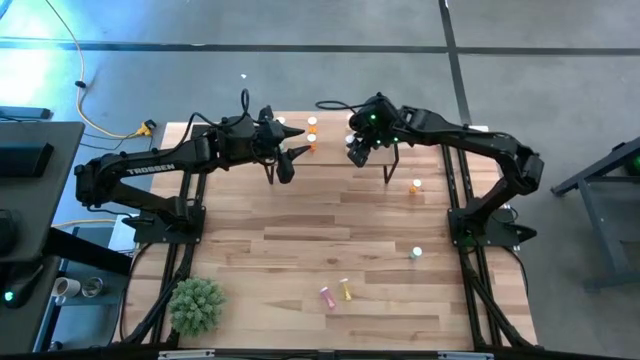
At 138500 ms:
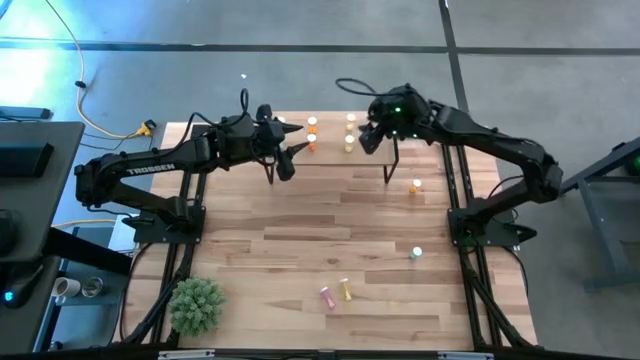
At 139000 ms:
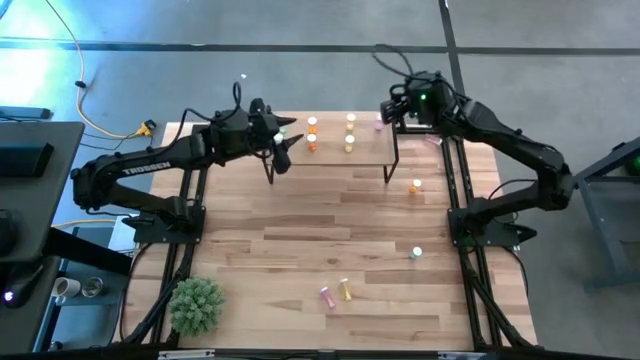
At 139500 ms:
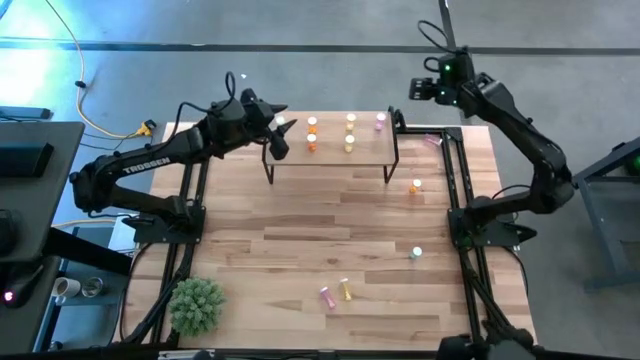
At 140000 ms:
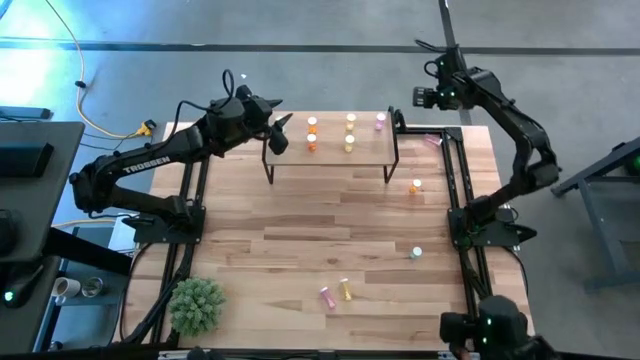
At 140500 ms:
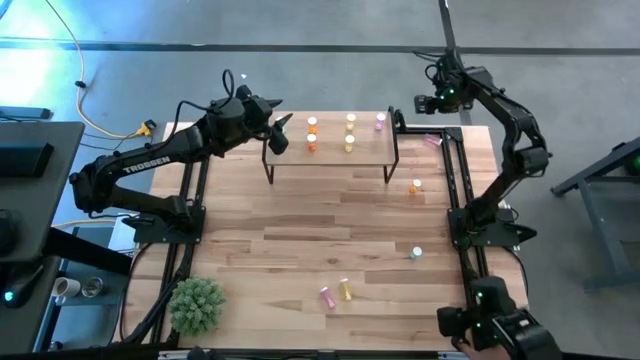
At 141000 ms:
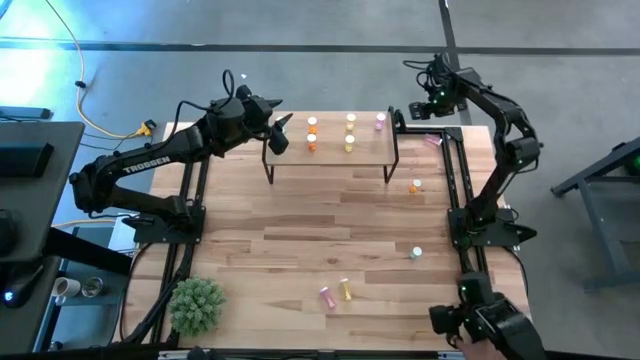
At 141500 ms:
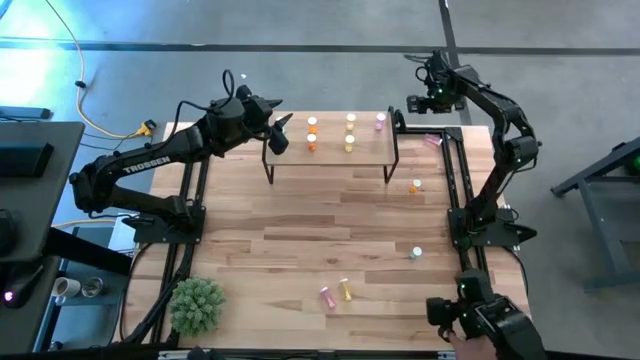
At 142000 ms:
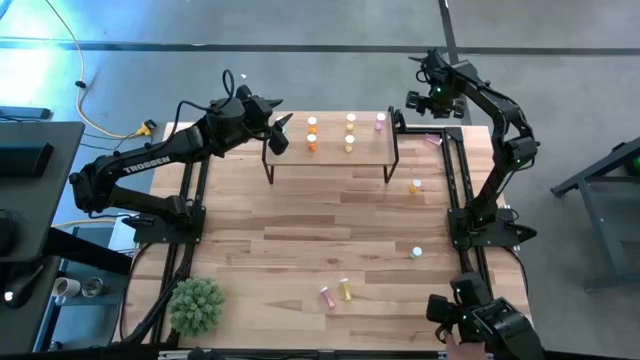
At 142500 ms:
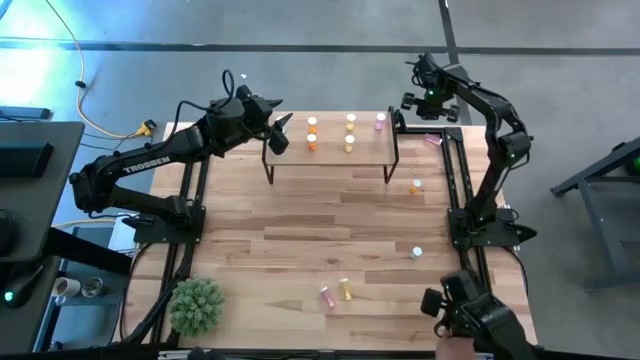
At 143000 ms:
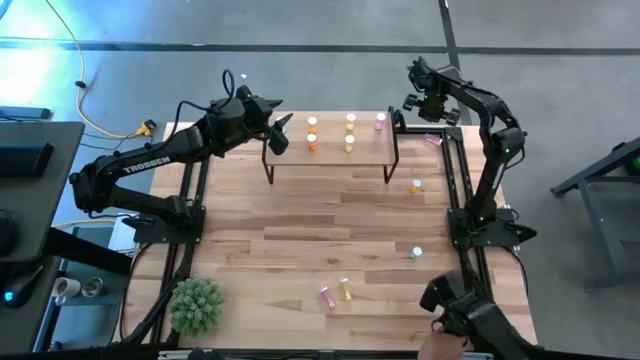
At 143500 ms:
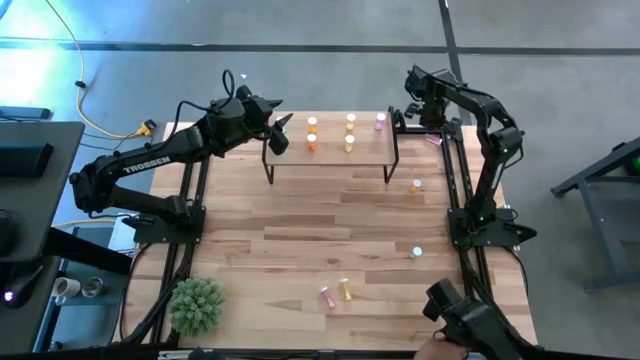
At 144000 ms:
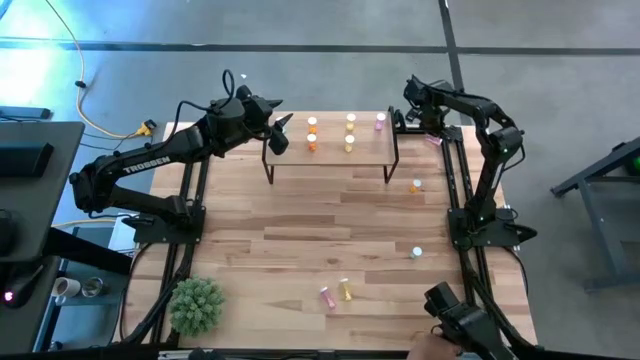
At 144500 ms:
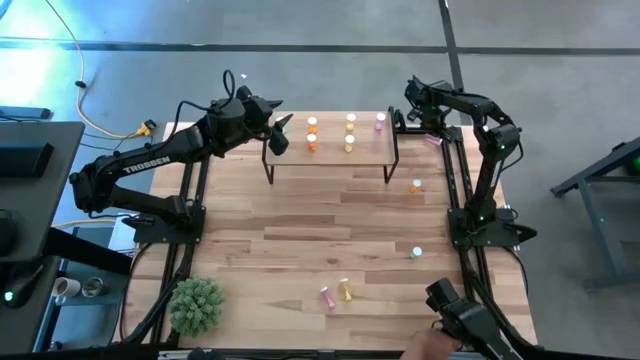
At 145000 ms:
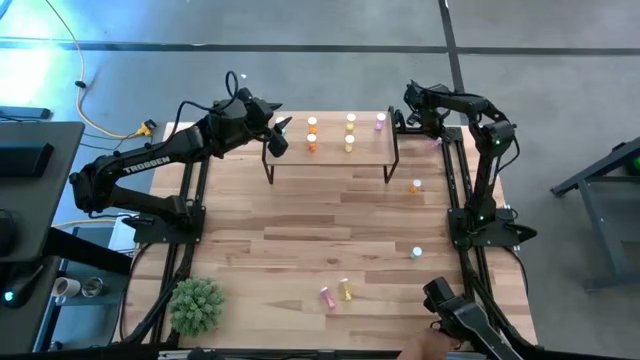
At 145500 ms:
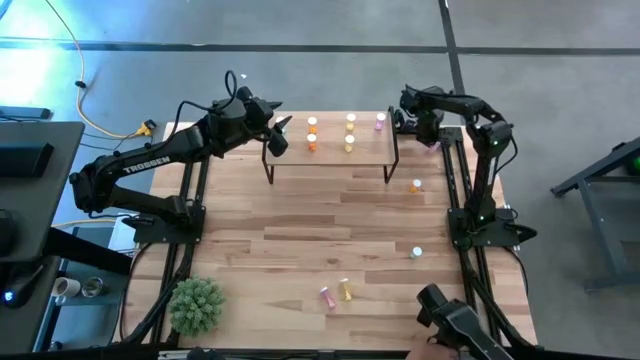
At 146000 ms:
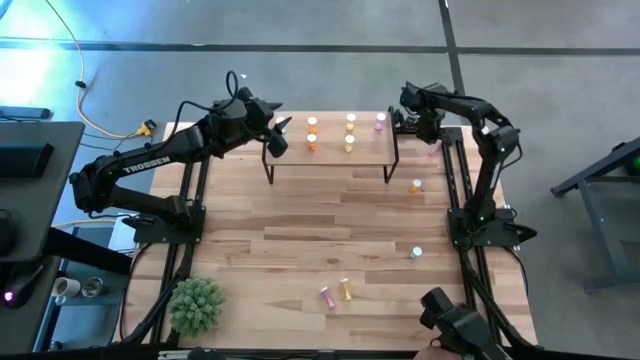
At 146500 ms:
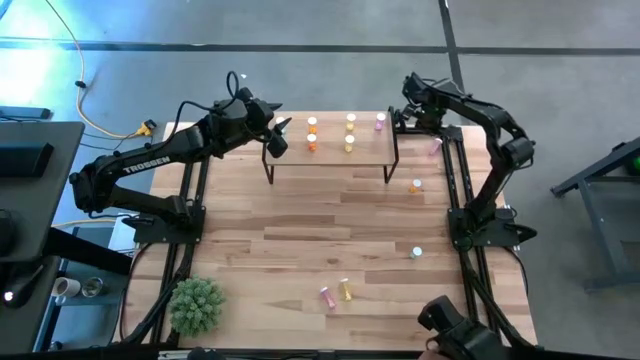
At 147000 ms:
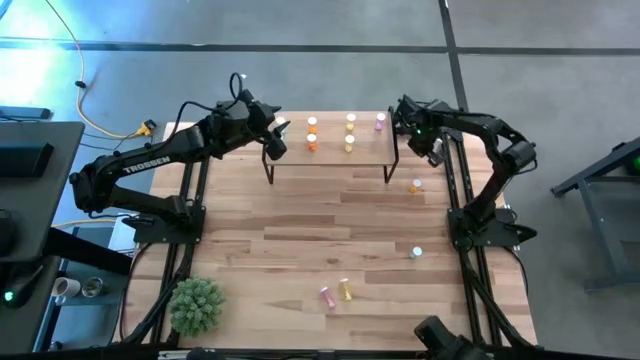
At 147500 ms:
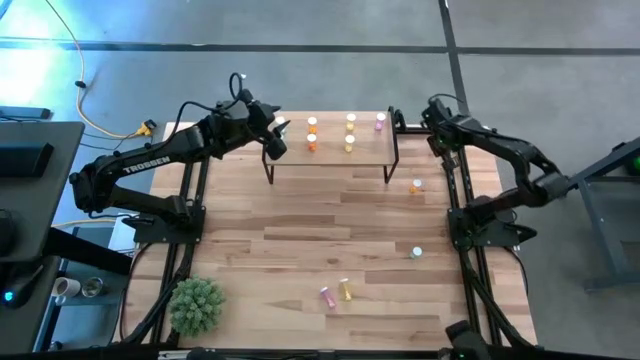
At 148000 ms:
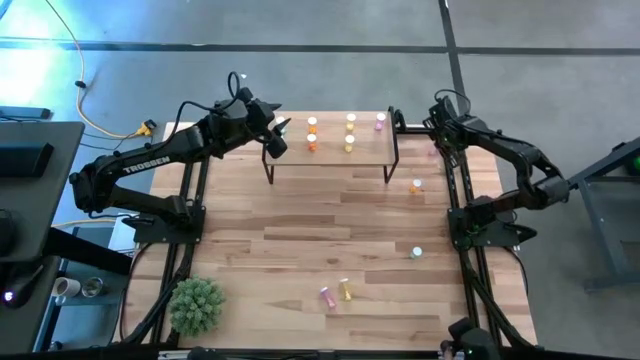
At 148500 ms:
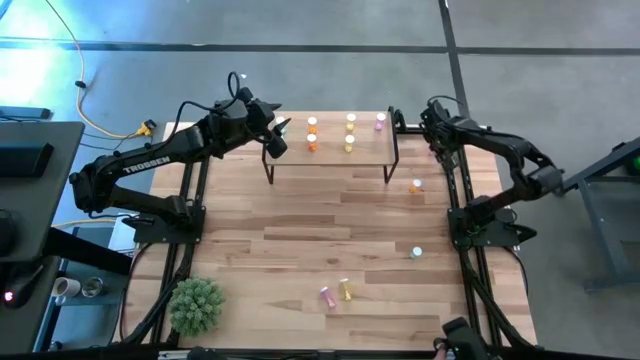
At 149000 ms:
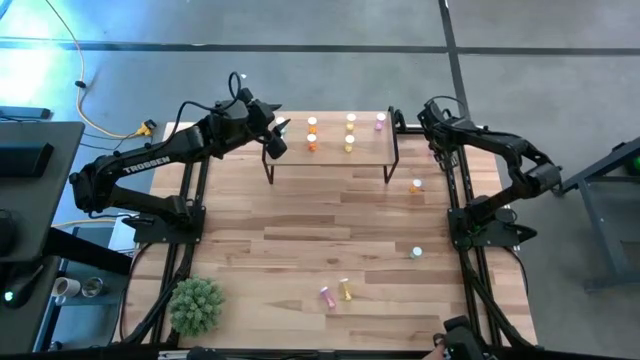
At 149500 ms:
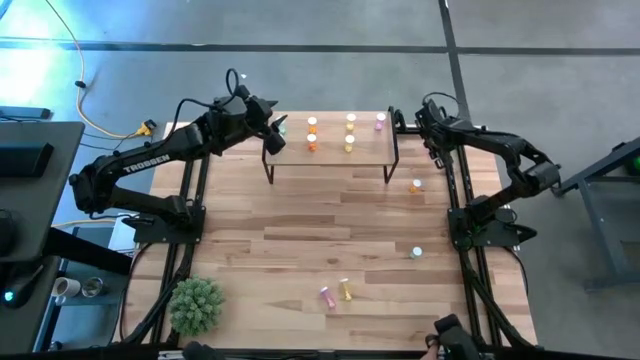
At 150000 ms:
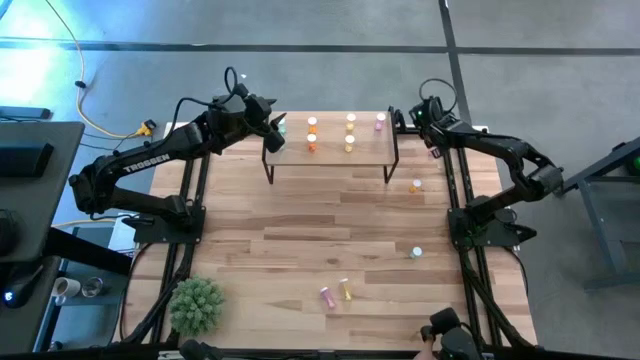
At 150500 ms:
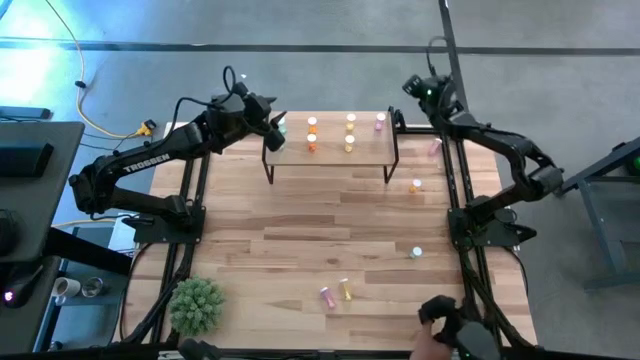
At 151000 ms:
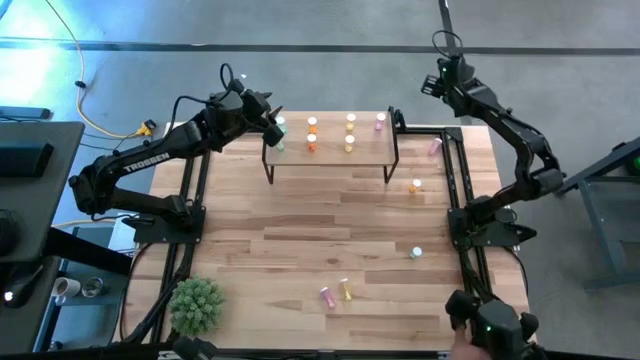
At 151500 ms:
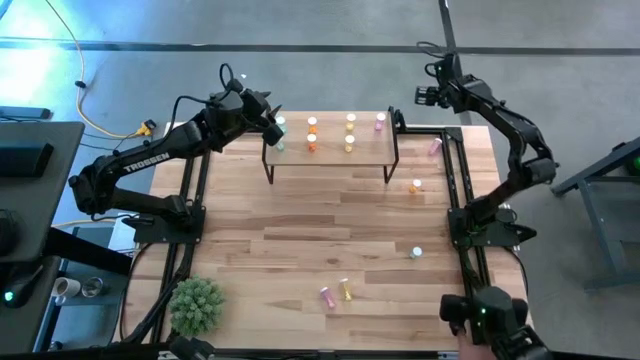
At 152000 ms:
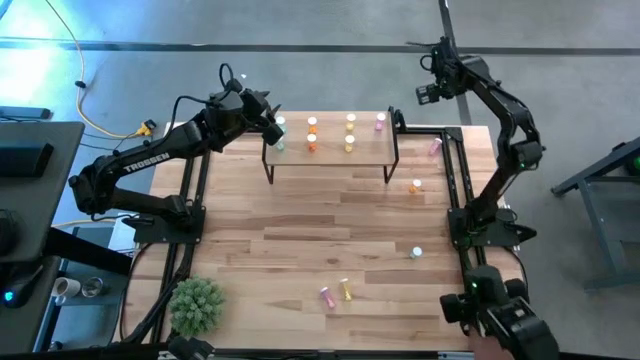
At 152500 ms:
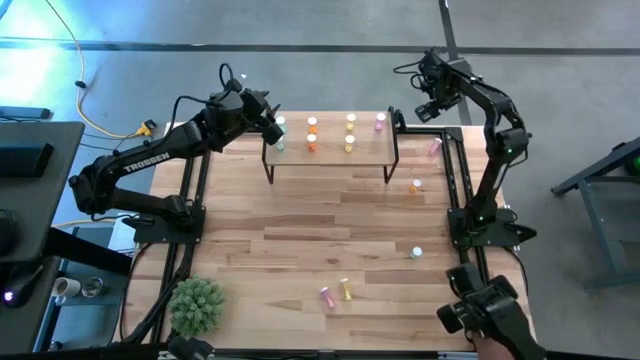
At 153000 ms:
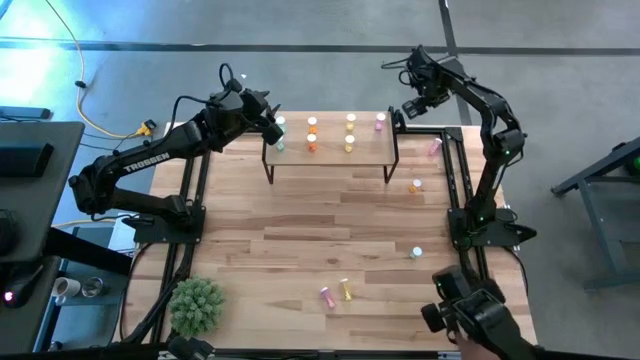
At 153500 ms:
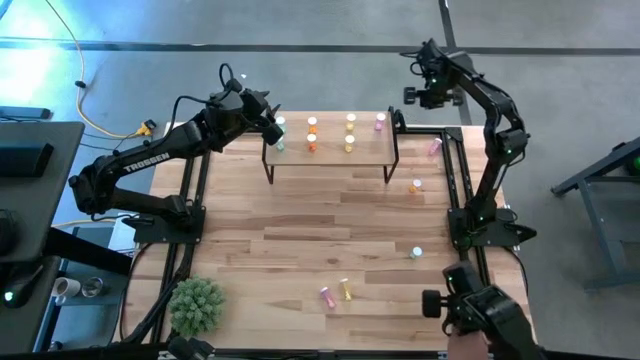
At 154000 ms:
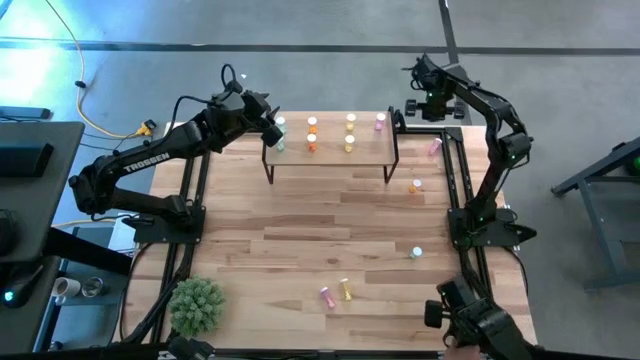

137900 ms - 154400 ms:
Task: Pick and place medicine bottles onto shelf by color
Put the top violet pill bottle on the shelf aligned with the other violet pill bottle
